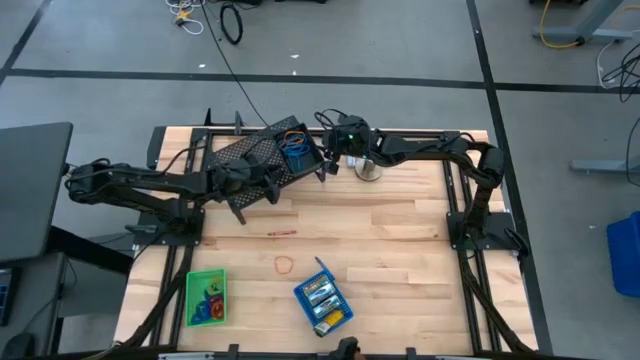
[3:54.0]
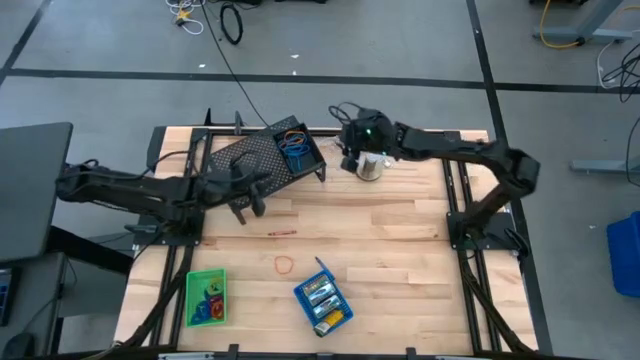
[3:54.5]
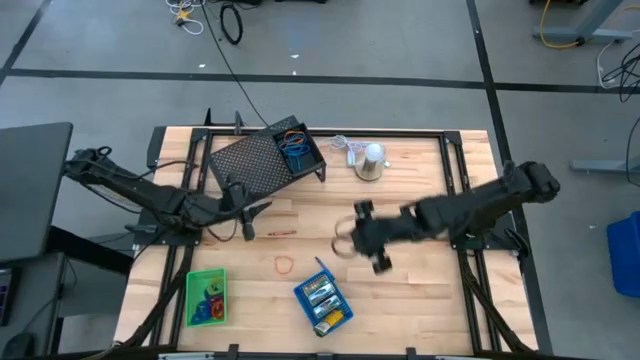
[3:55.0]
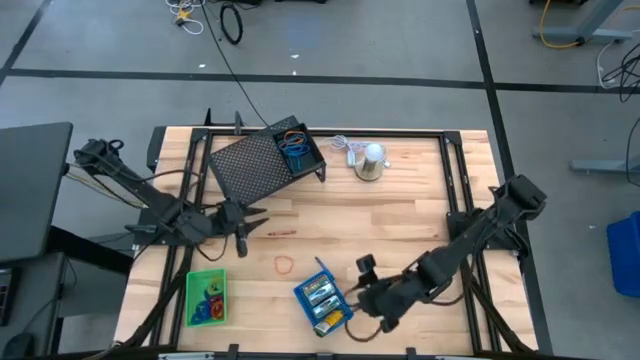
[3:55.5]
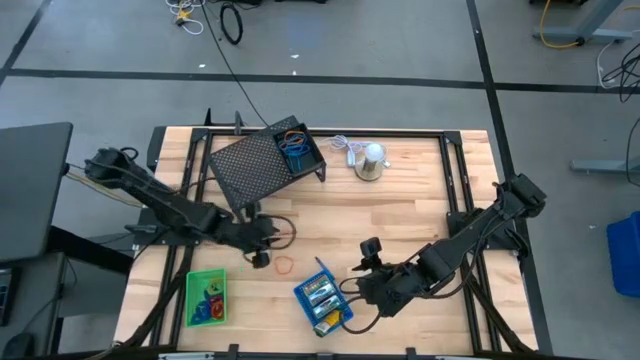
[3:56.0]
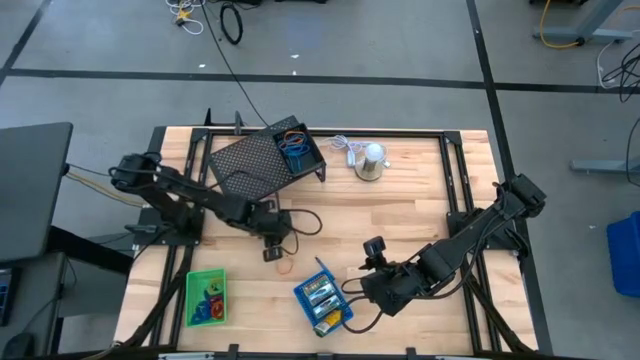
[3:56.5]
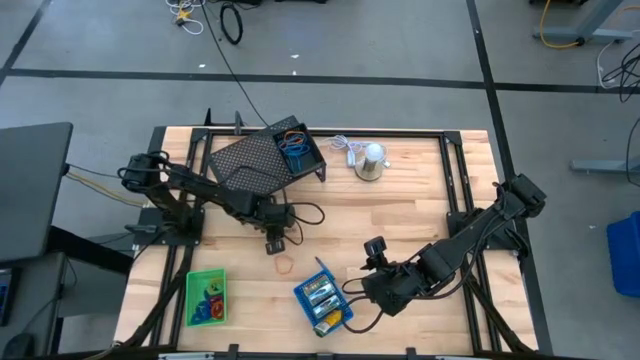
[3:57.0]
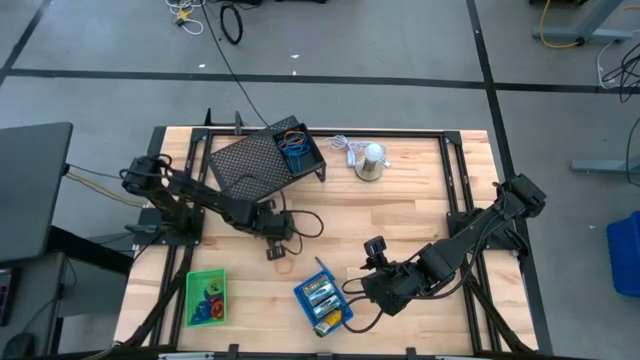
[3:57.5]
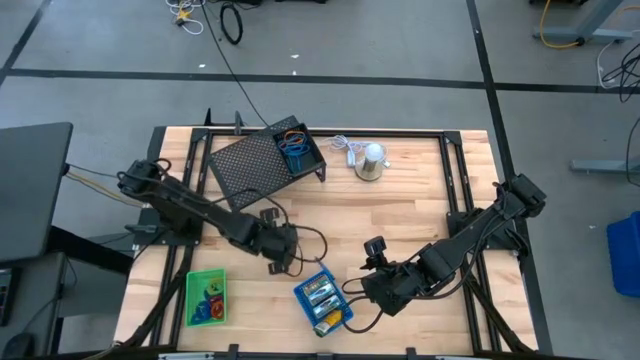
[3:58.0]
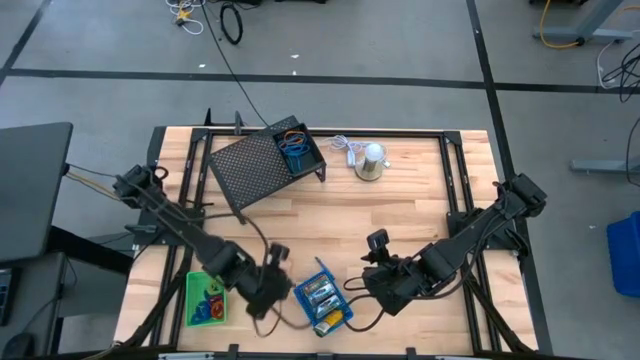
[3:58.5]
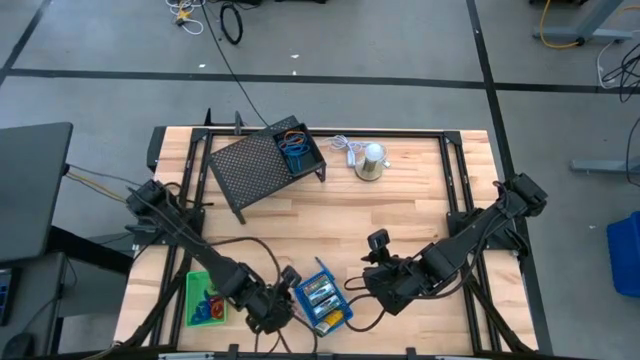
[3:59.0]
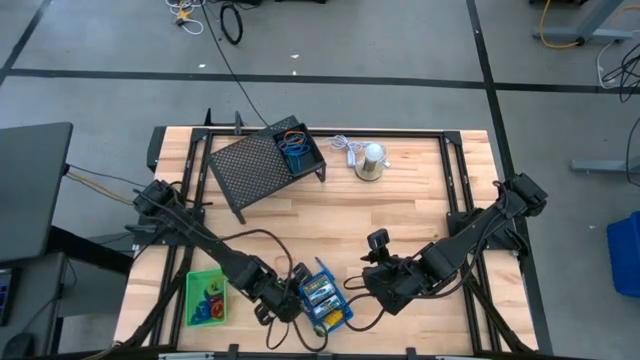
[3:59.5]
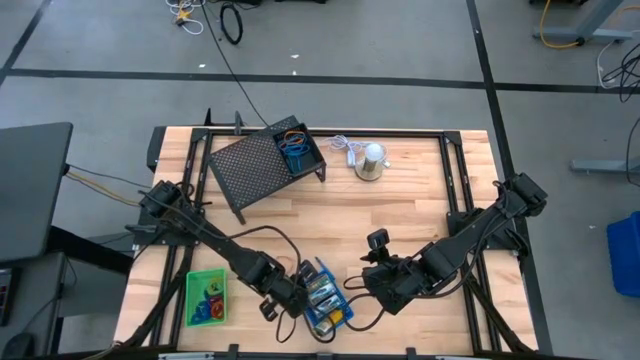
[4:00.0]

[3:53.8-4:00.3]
Task: Pick & Place Office Desk Supplies
Put the red crayon into the blue bin

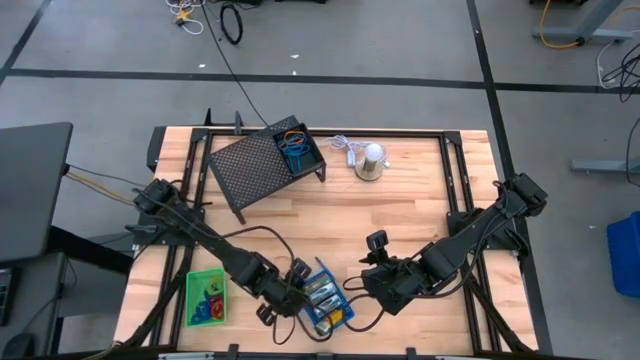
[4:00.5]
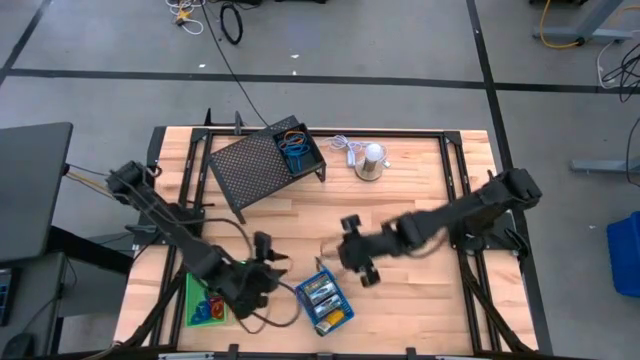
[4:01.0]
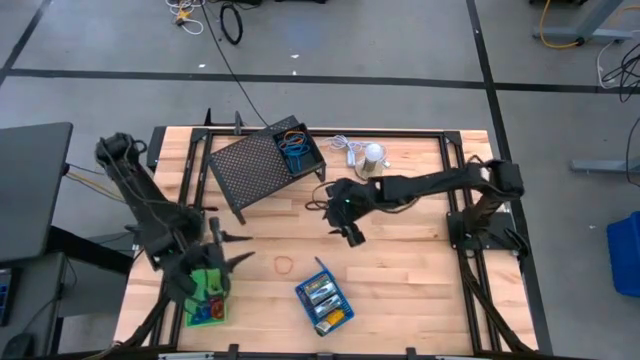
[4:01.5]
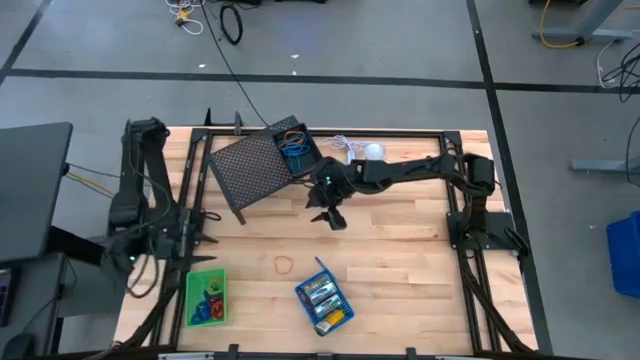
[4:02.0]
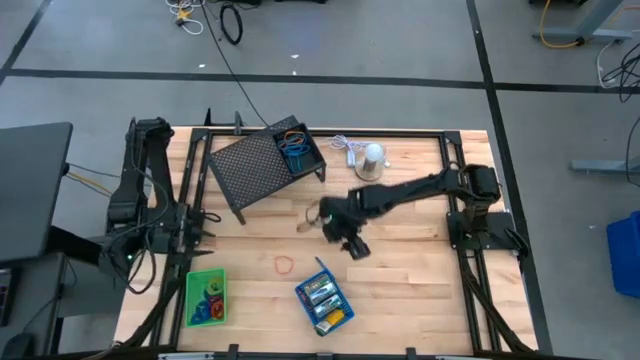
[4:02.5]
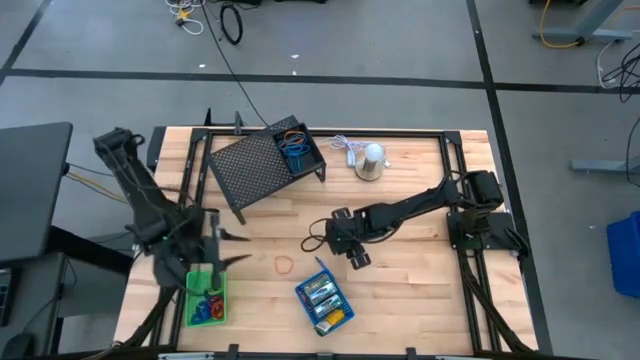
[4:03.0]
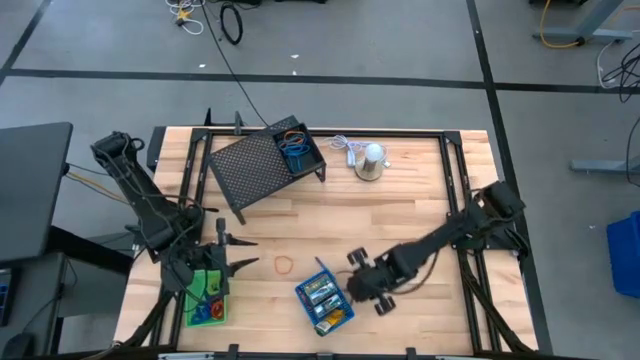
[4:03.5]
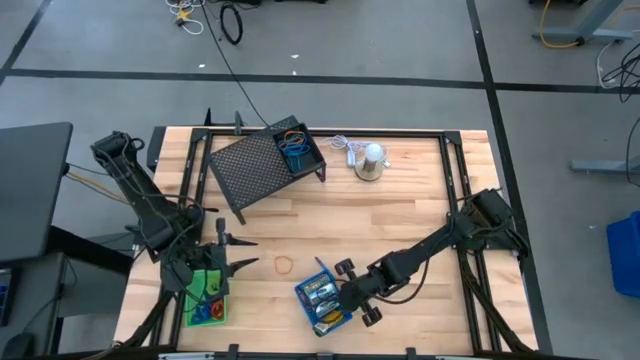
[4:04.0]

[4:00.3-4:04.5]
Adjust the blue bin

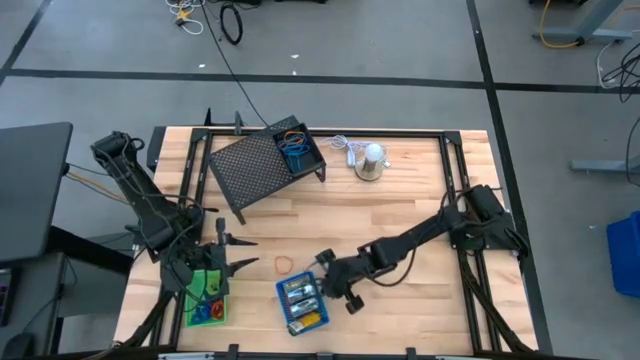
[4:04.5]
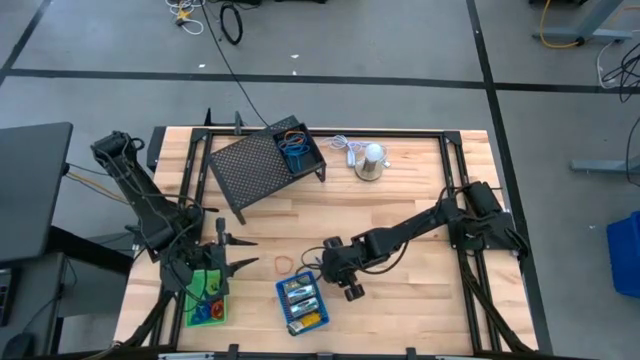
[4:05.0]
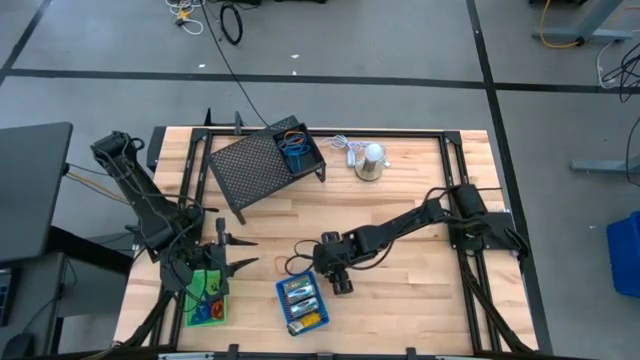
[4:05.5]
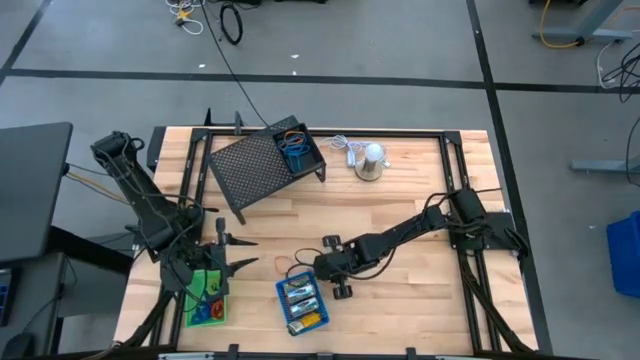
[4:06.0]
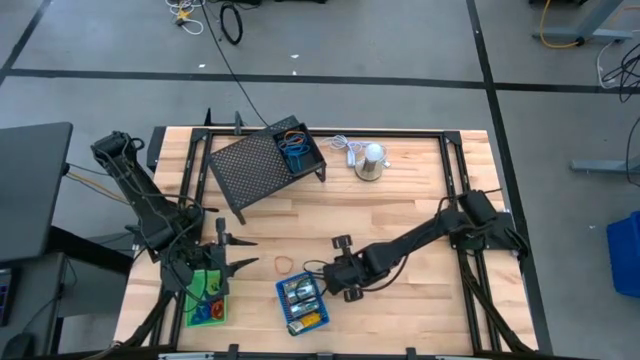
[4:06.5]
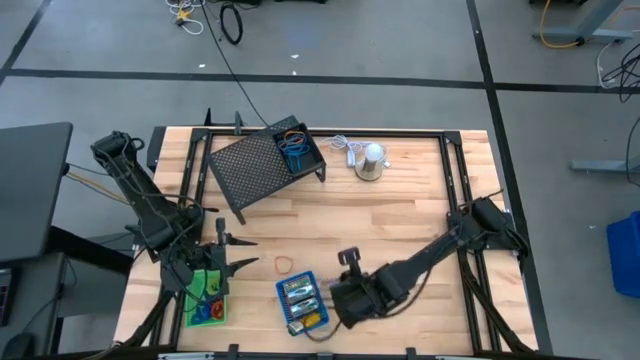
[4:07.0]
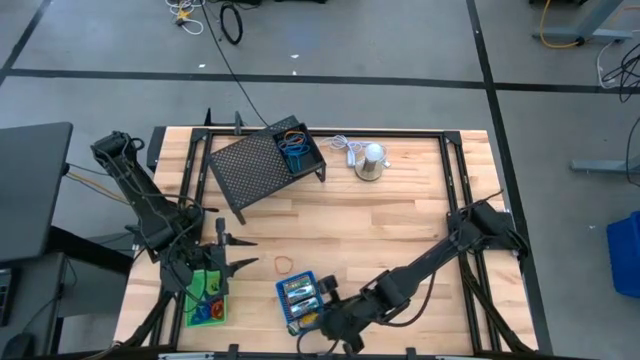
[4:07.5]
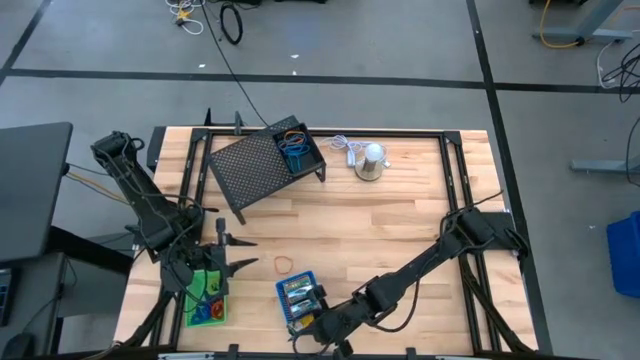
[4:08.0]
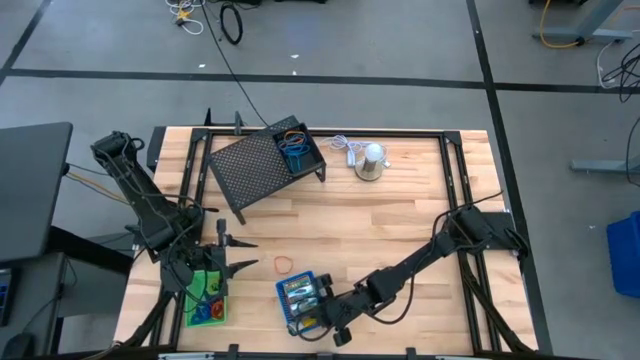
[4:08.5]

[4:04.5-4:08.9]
Put the blue crayon into the blue bin

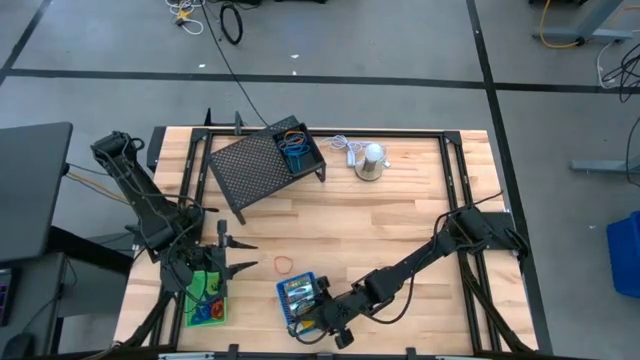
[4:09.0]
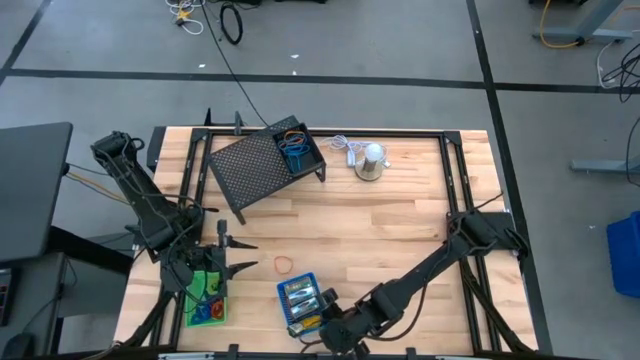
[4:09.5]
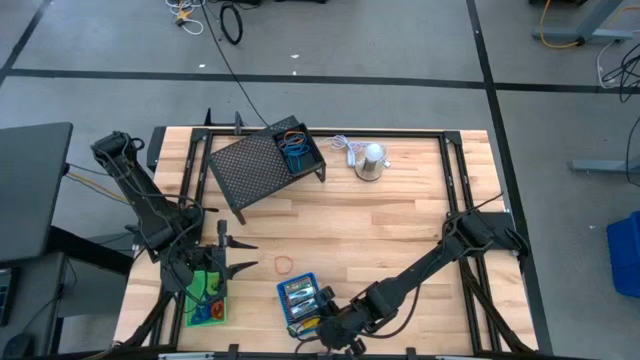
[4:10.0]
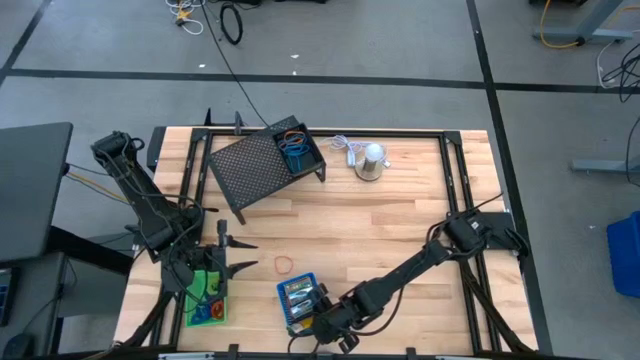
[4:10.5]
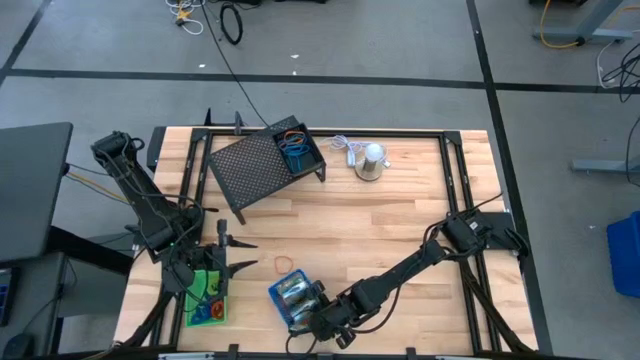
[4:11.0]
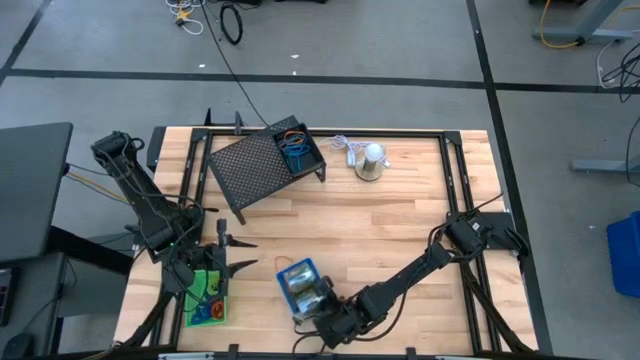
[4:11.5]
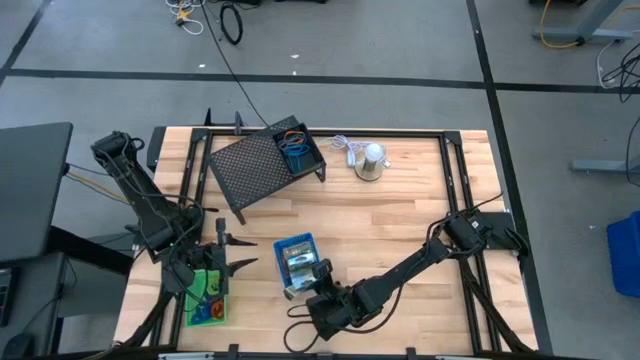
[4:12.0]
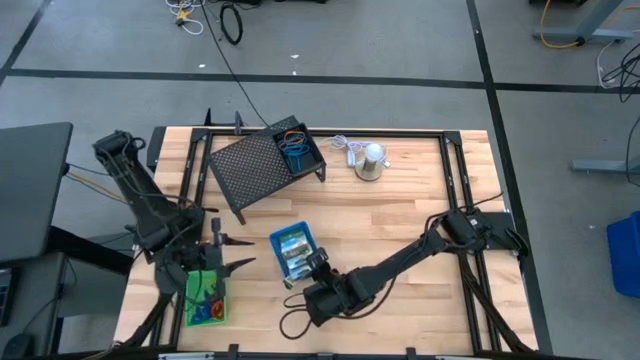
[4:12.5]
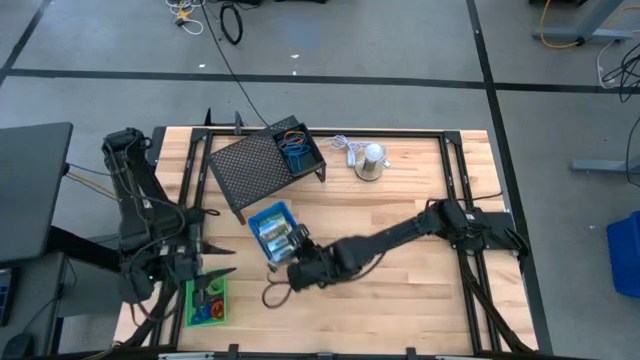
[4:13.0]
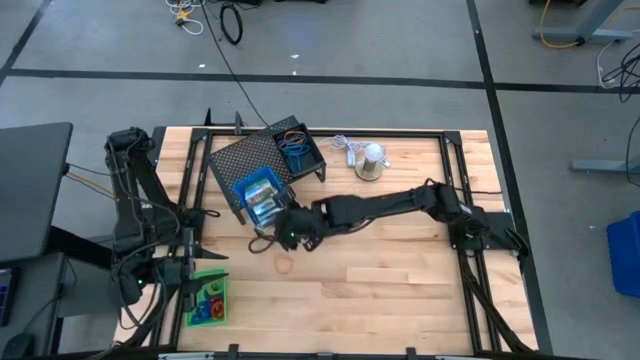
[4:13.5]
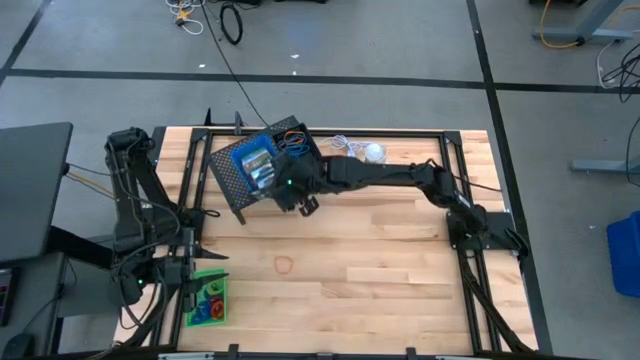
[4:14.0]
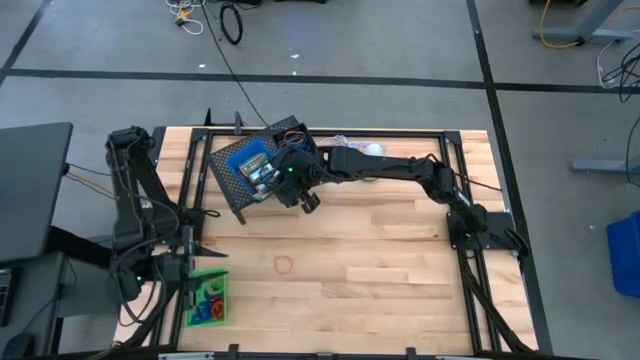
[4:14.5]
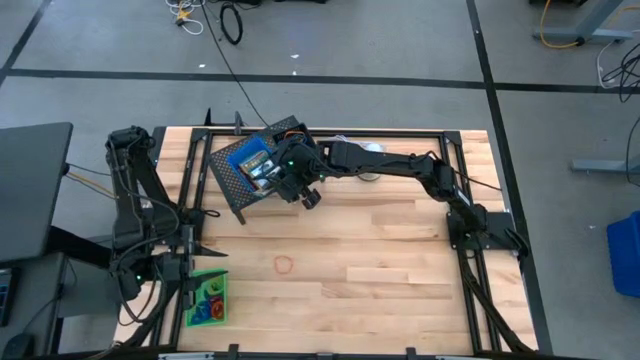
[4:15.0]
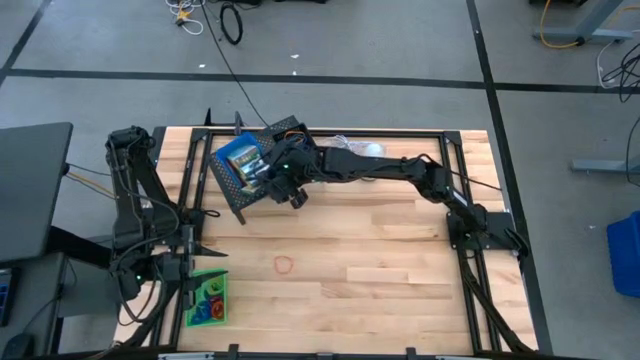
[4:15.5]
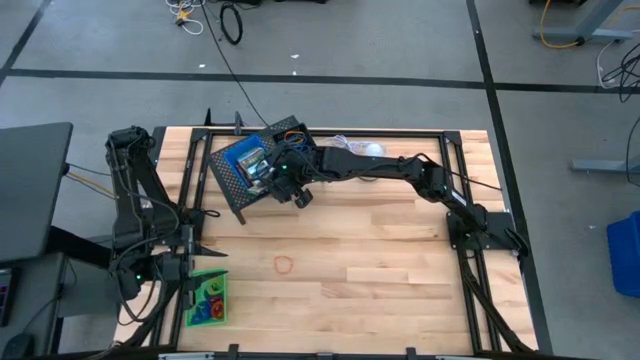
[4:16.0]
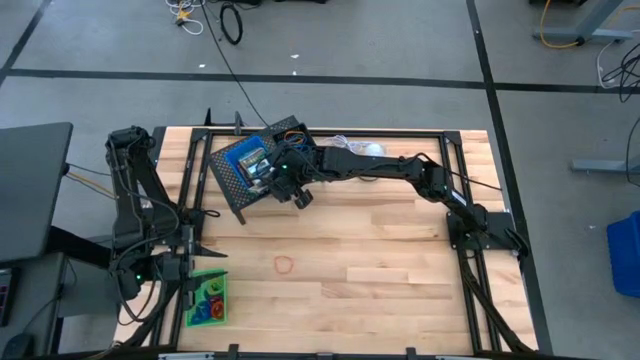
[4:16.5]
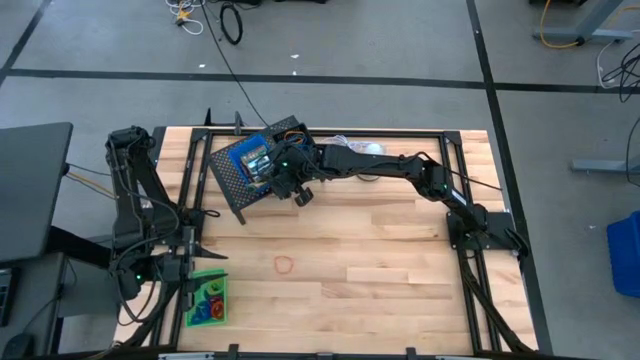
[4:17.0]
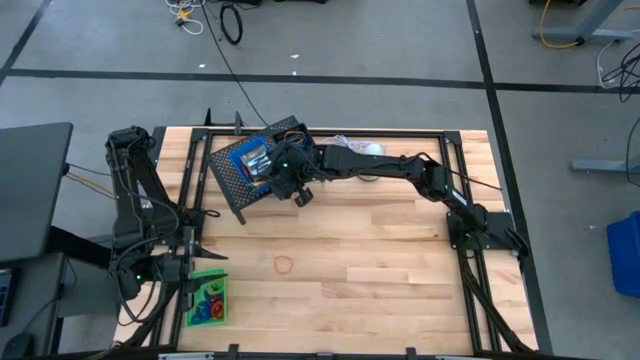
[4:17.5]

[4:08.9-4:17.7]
Put the blue bin with crayon boxes on the shelf
